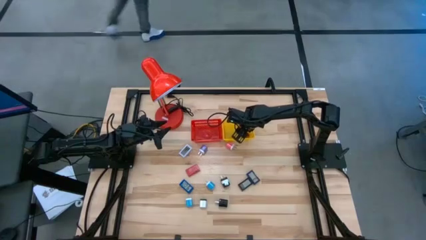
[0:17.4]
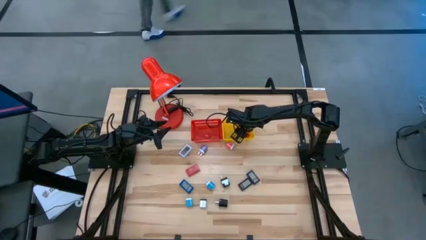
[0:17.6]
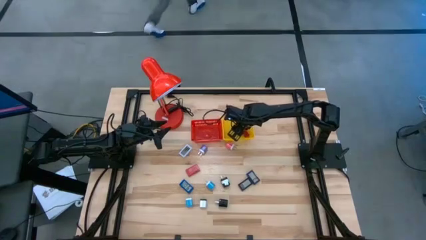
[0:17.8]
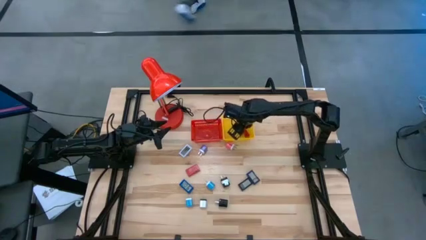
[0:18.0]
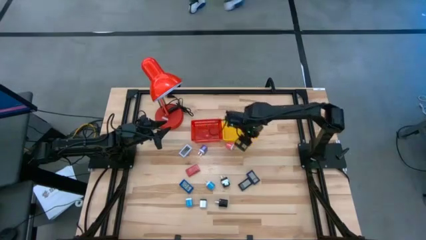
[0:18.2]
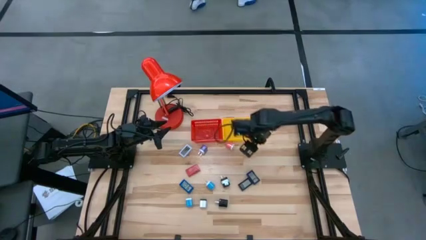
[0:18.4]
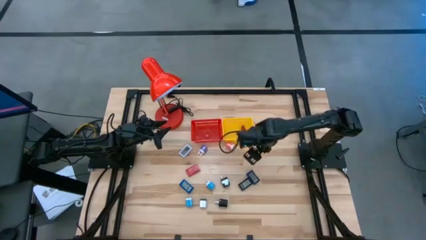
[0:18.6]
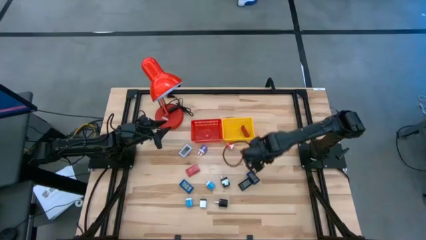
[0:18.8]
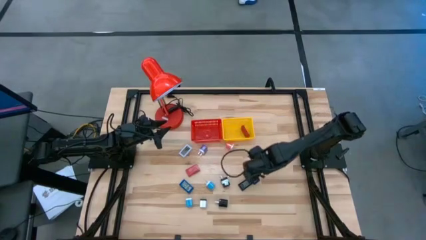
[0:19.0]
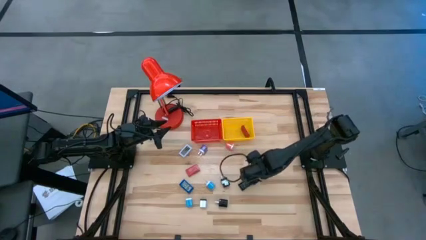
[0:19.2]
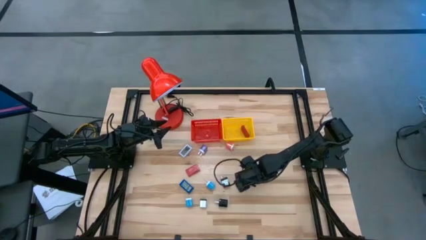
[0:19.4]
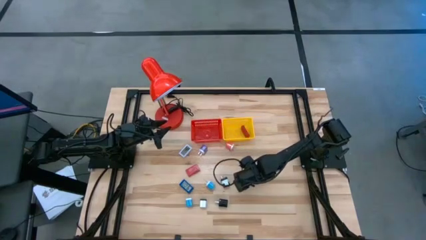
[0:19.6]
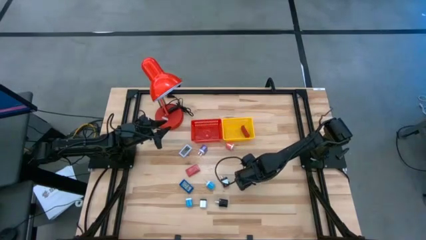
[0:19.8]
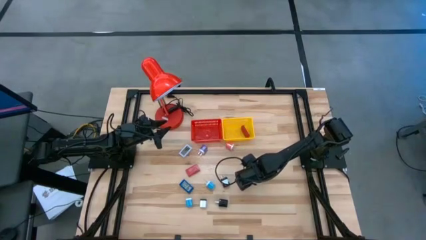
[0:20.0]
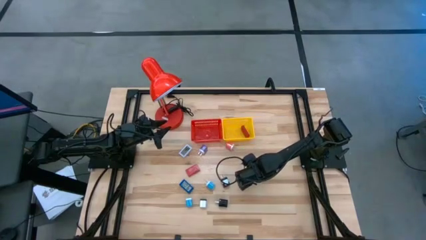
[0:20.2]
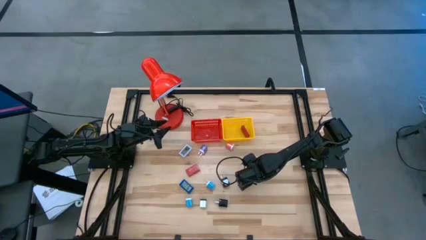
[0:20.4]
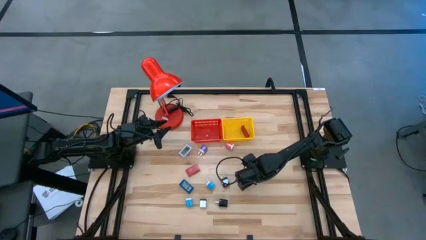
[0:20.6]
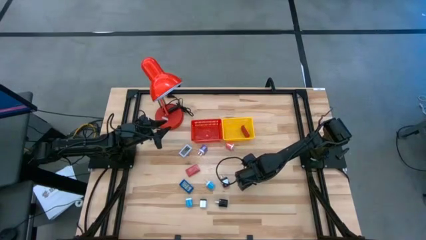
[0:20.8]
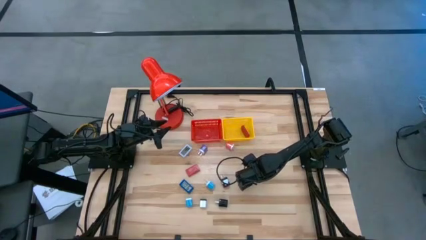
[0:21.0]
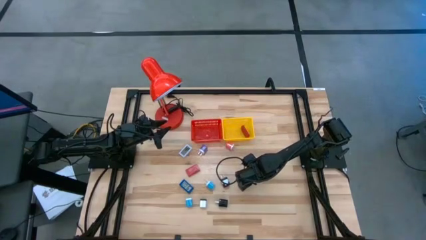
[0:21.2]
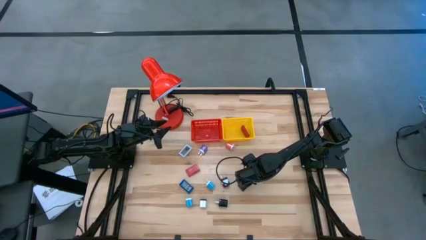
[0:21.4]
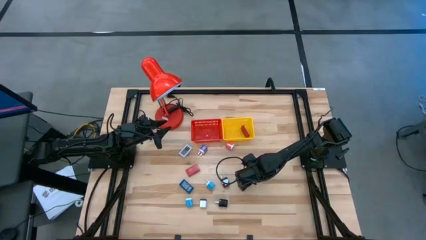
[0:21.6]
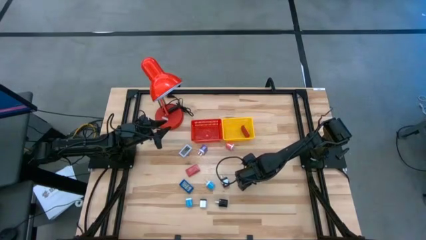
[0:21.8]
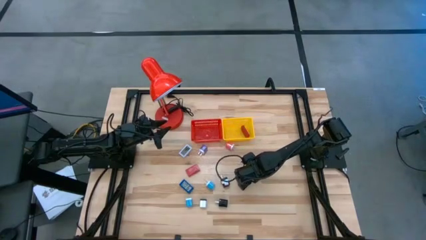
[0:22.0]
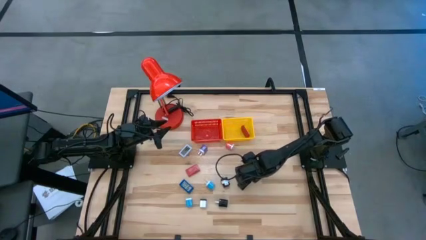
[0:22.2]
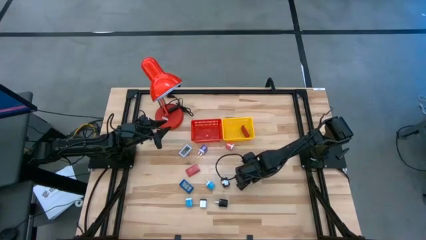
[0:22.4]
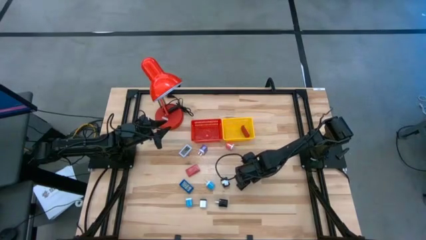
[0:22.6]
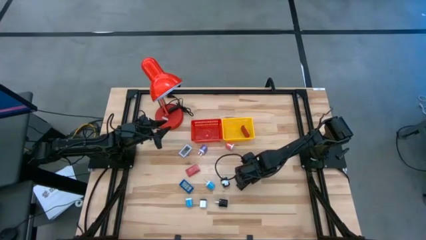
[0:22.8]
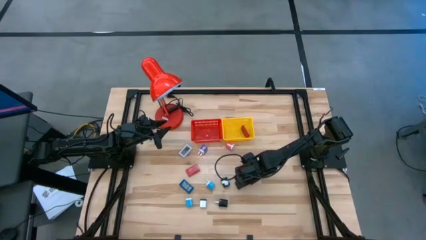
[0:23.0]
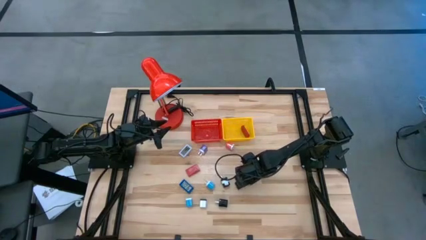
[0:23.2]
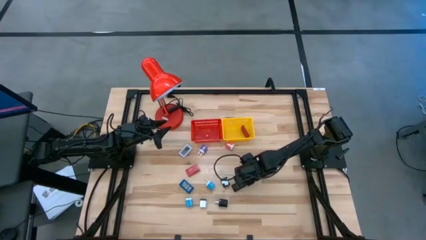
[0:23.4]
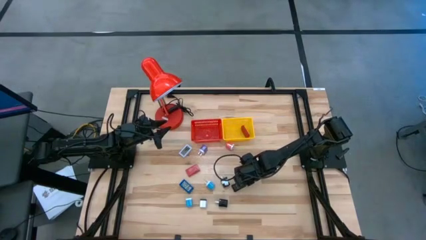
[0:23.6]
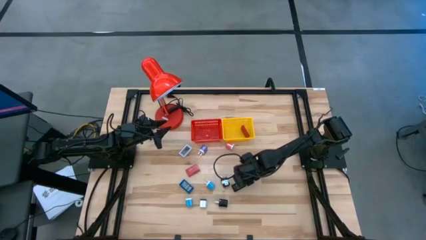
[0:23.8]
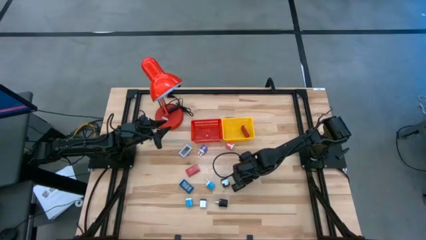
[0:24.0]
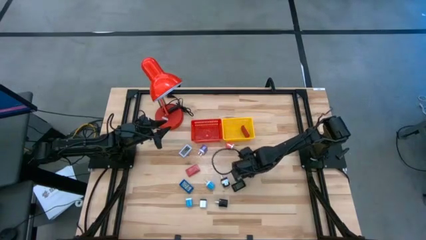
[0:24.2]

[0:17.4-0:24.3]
Task: Pick & Place Office items
Put the right dark blue digital timer into the yellow bin

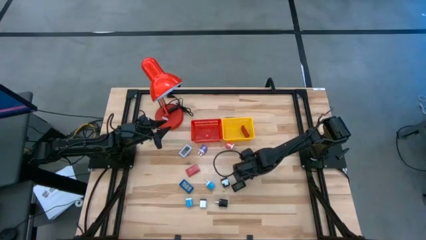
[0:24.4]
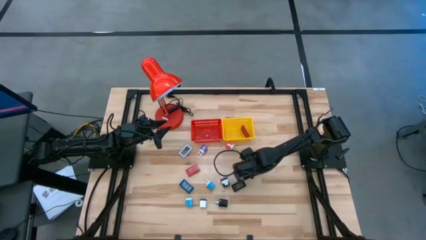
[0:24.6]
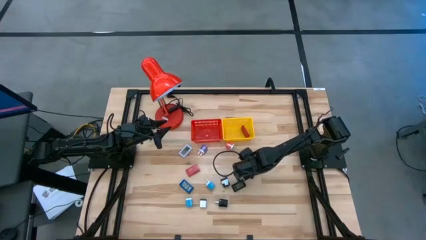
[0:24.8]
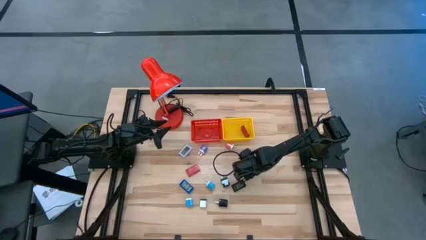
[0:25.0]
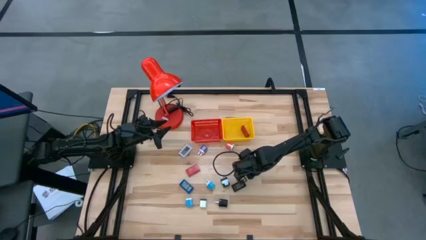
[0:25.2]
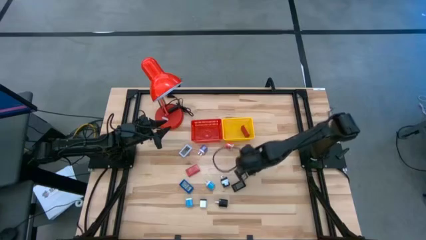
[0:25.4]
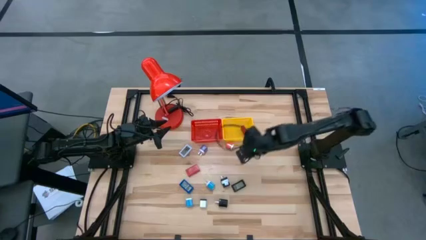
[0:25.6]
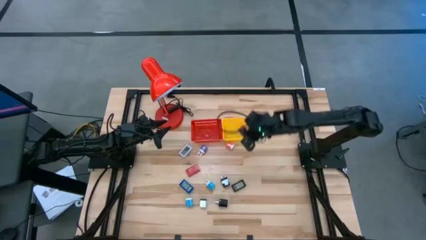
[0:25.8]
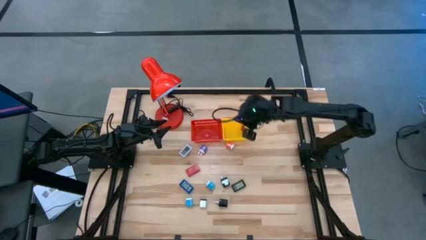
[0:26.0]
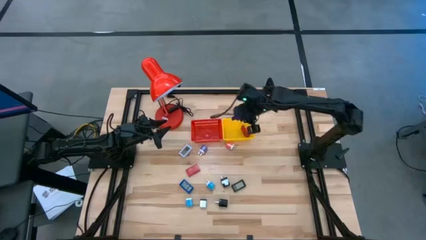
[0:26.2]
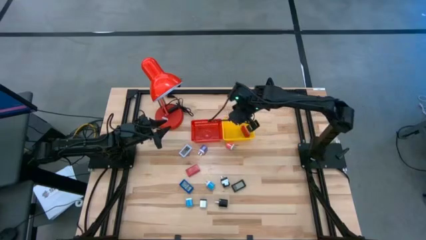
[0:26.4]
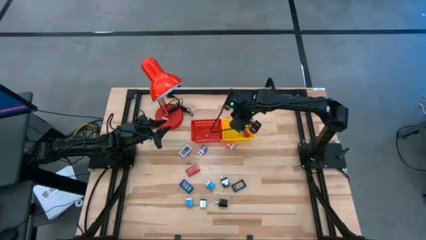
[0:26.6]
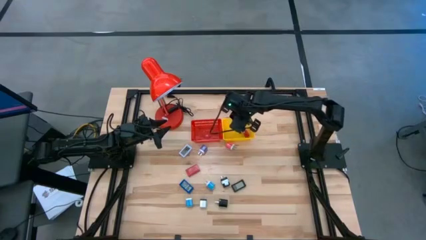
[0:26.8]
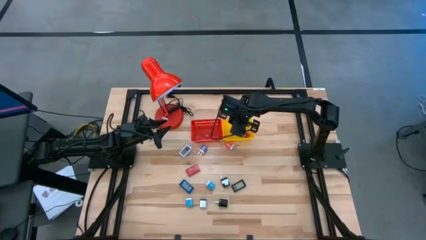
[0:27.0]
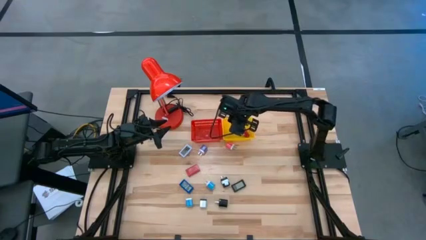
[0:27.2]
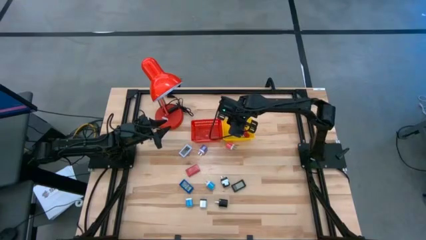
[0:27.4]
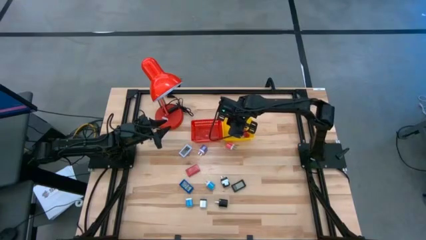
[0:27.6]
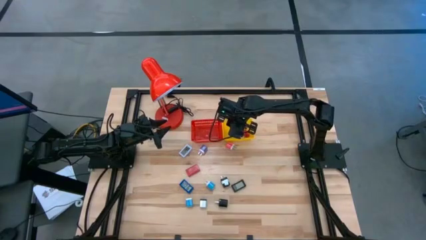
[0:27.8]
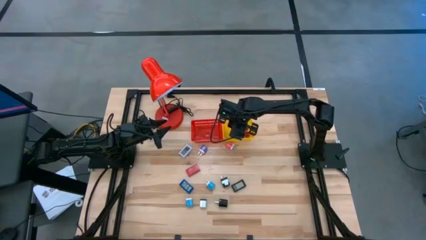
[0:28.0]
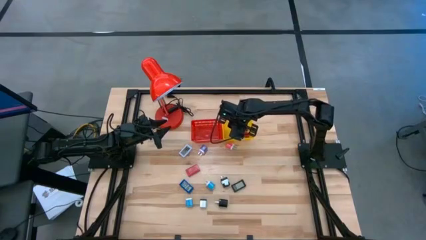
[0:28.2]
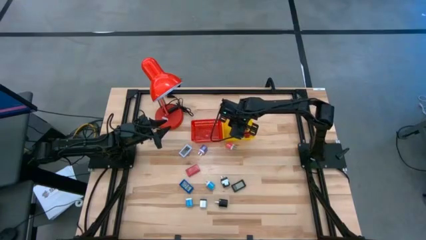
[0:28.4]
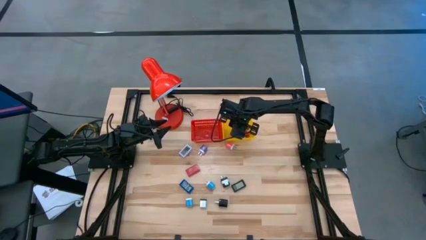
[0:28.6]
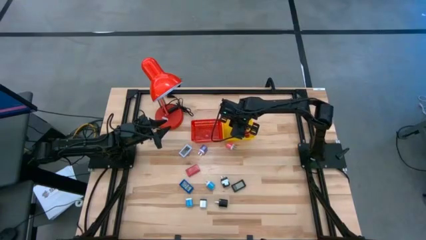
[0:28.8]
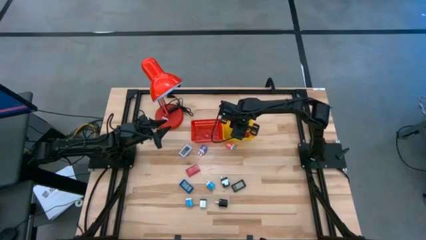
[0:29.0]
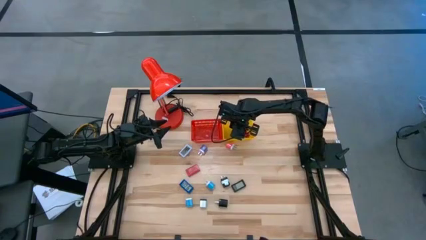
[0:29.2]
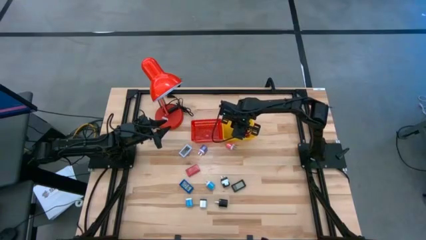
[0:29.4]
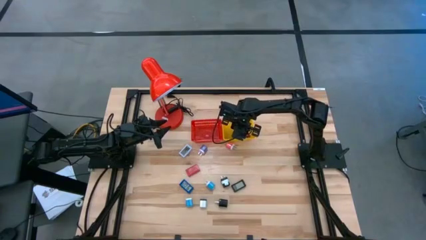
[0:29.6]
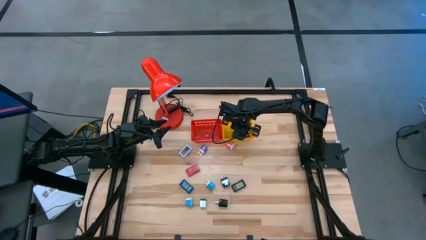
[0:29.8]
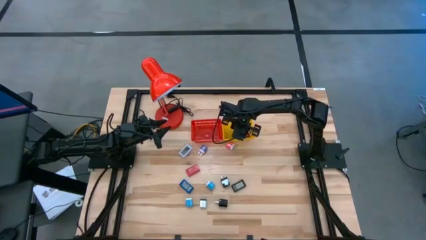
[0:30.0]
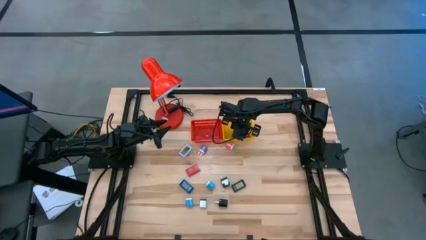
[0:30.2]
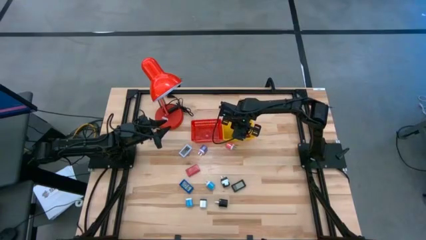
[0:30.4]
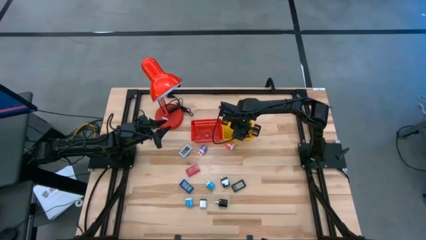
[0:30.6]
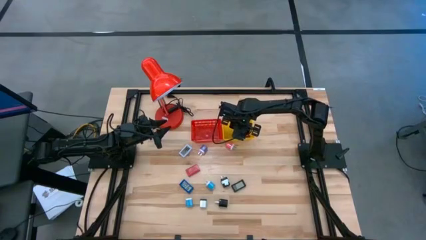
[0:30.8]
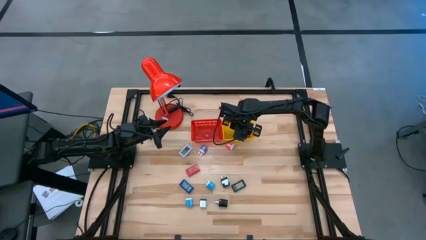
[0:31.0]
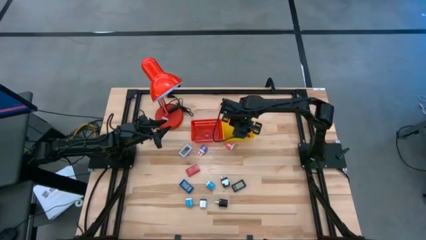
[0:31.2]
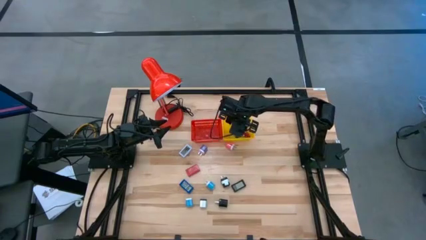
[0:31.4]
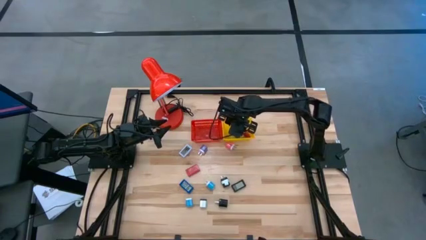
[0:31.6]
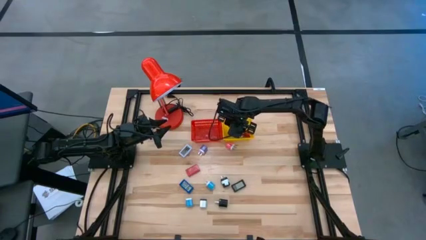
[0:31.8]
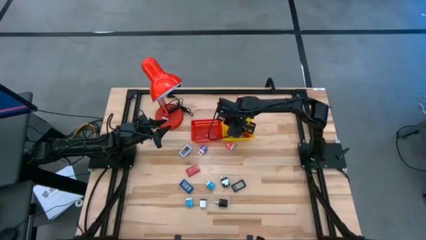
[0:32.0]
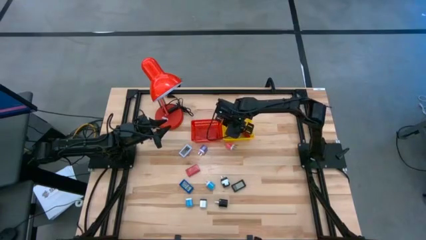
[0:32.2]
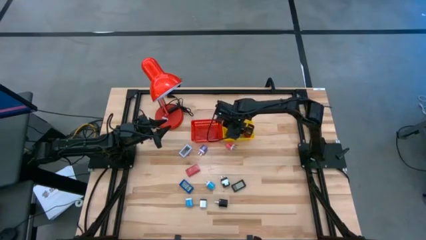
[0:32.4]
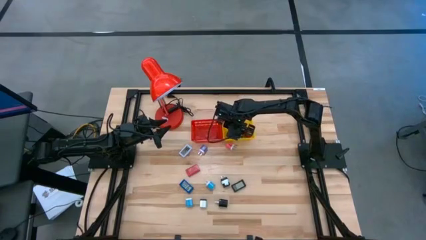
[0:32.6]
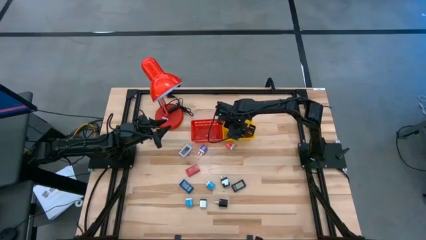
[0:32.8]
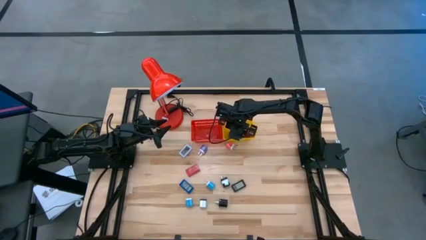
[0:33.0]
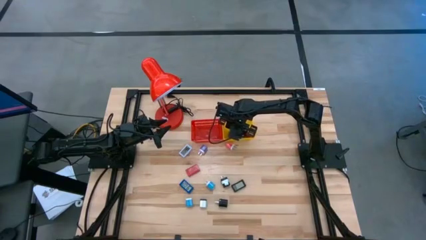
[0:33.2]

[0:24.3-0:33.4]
Put the right dark blue digital timer into the yellow bin
